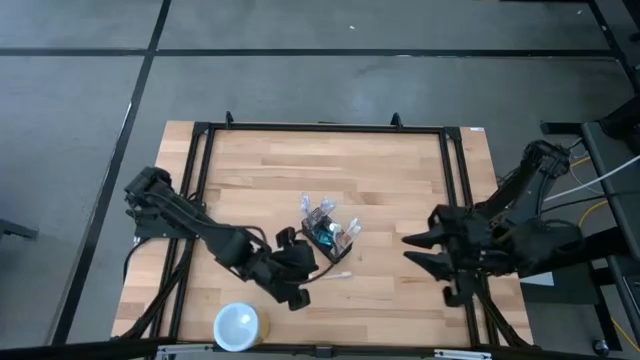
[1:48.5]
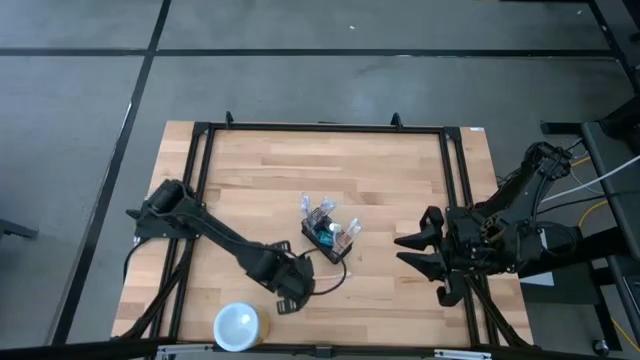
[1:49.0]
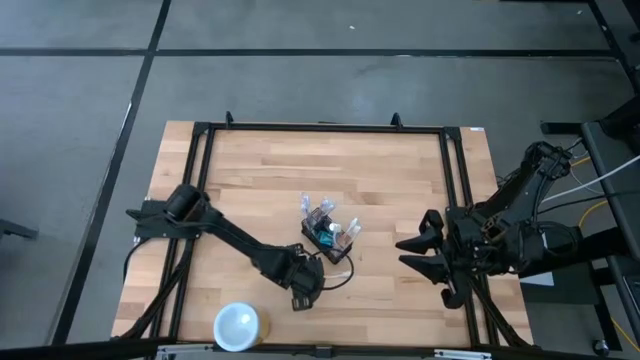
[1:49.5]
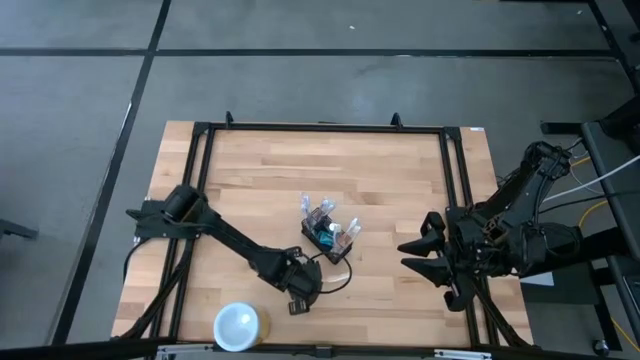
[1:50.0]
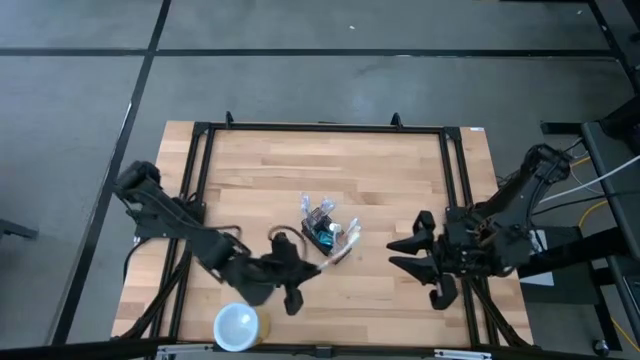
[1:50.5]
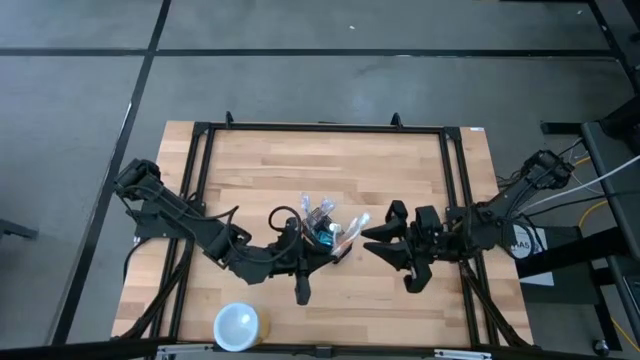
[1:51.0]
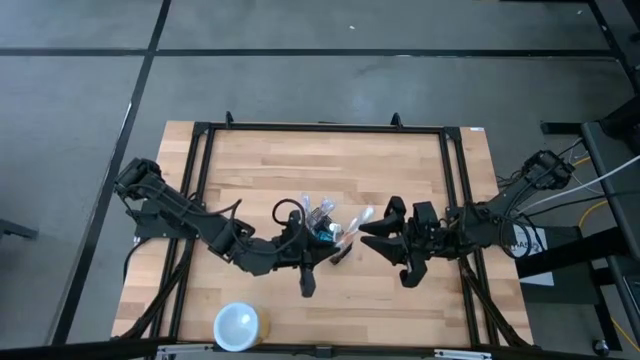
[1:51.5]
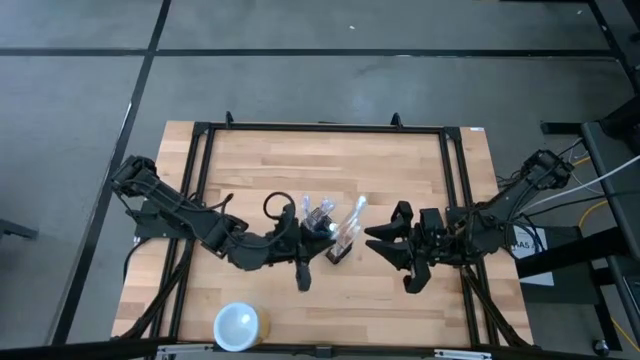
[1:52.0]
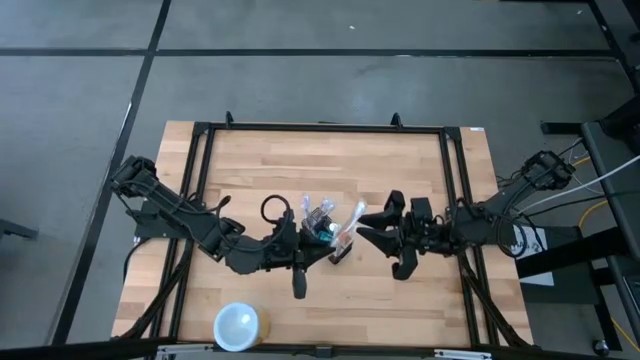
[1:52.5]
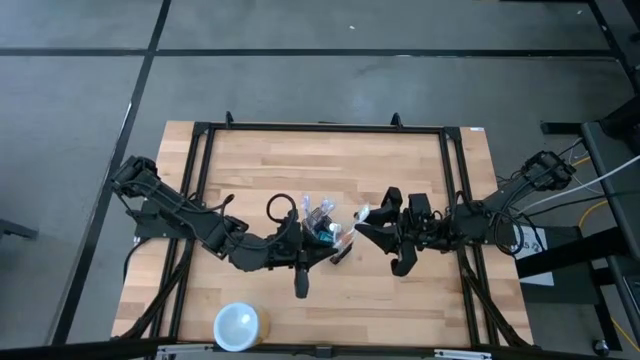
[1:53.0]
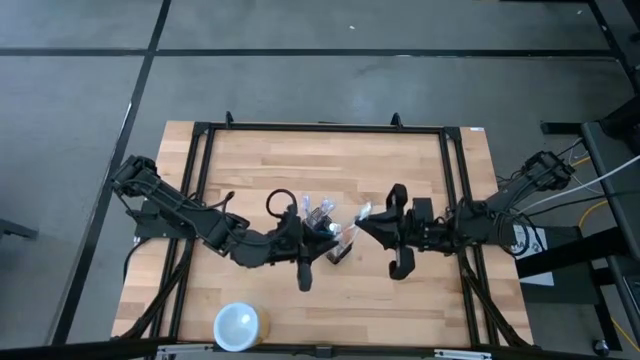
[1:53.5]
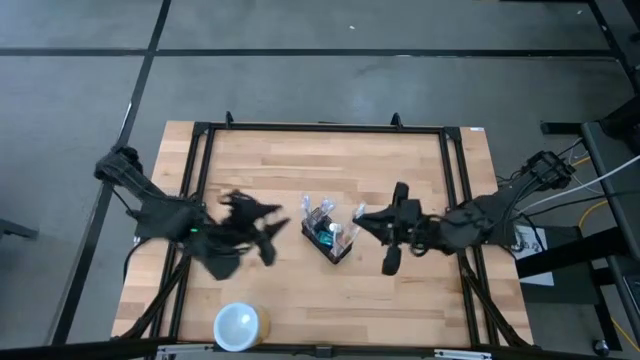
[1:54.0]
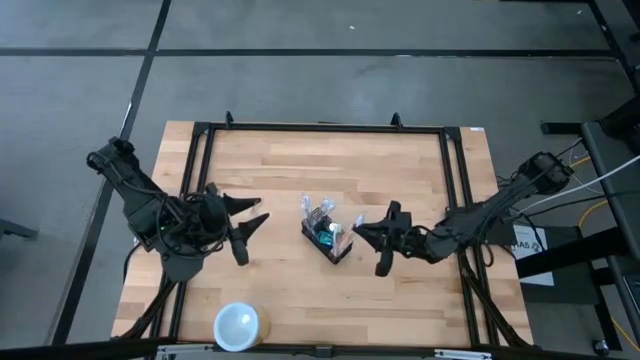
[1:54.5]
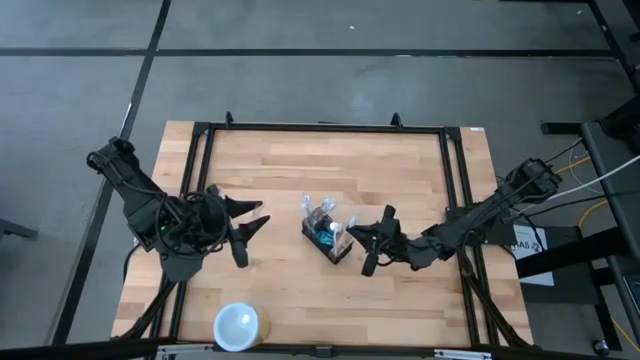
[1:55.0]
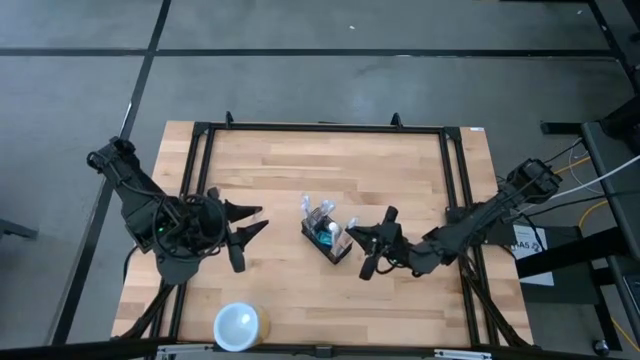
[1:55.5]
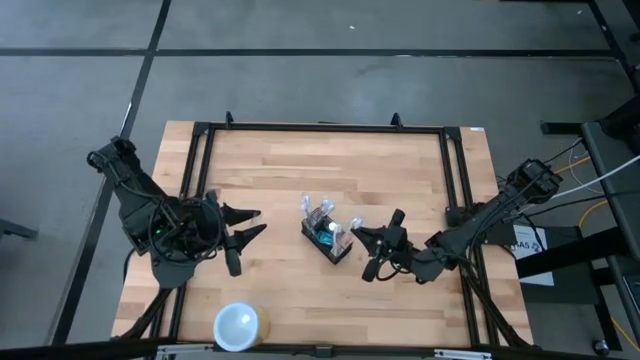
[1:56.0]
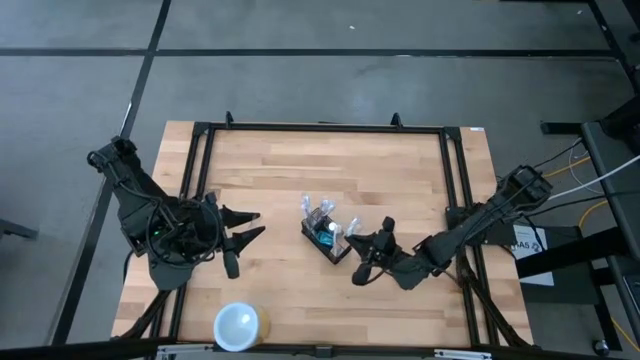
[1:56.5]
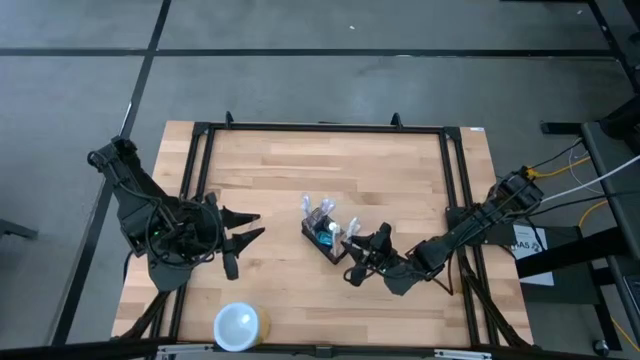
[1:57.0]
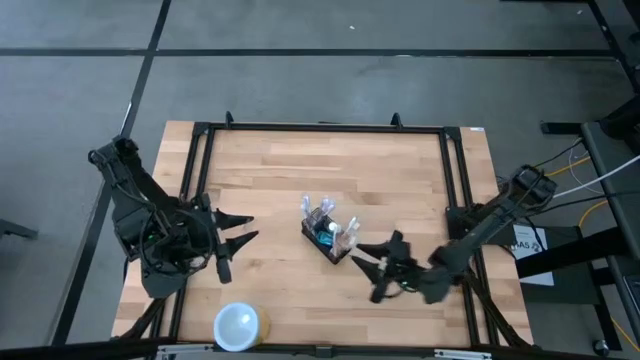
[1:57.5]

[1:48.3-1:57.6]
Task: Pick & Place toothbrushing station
Put the orange toothbrush into the wire organizer

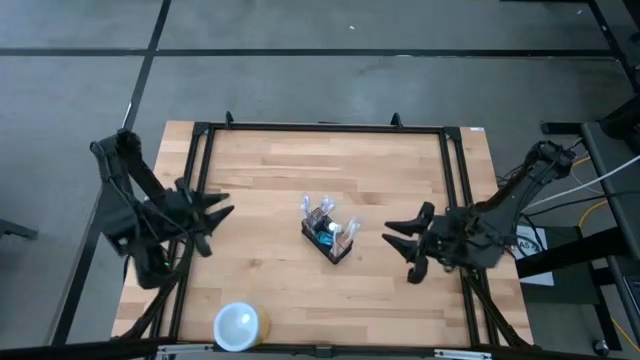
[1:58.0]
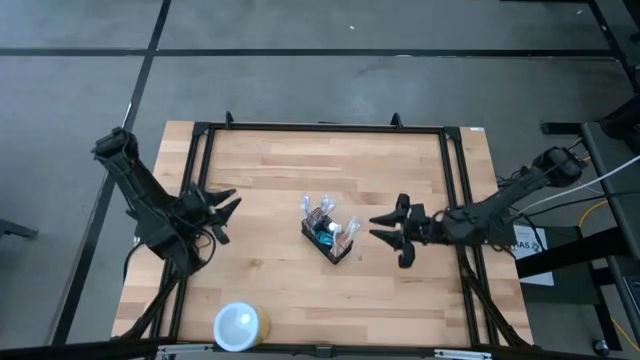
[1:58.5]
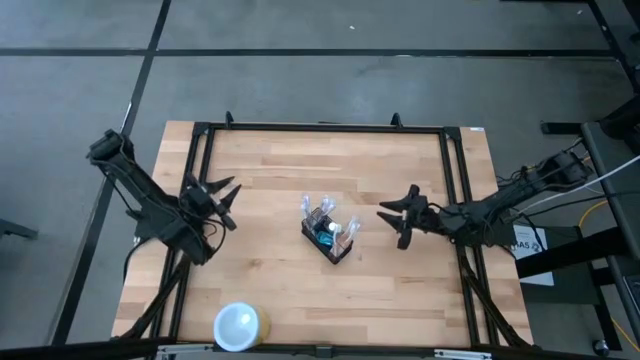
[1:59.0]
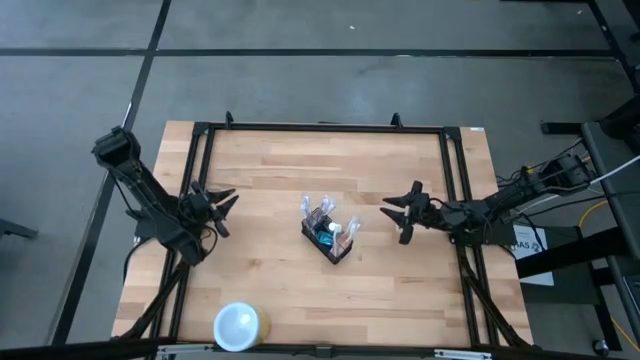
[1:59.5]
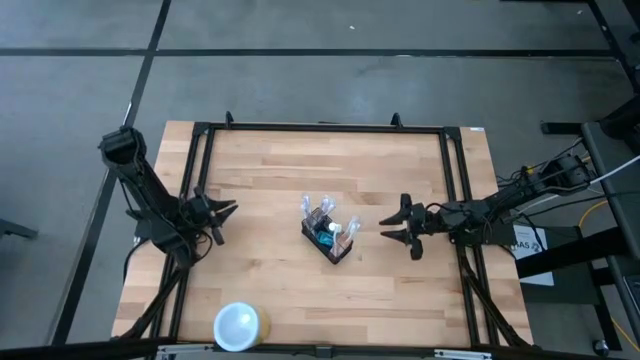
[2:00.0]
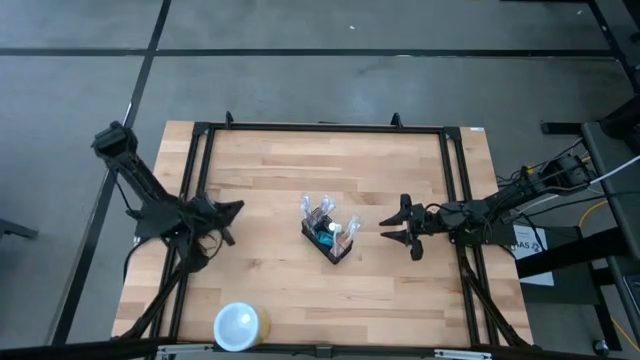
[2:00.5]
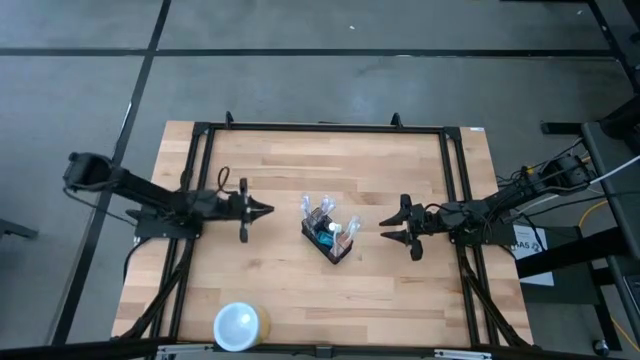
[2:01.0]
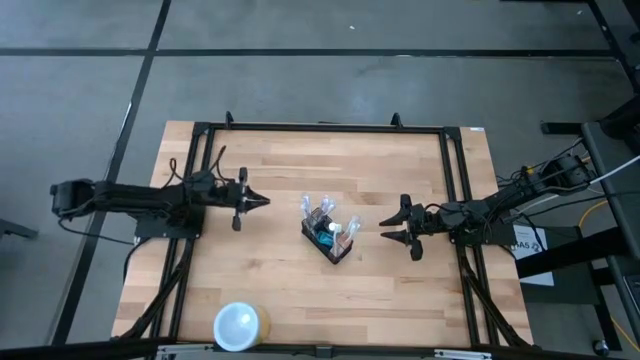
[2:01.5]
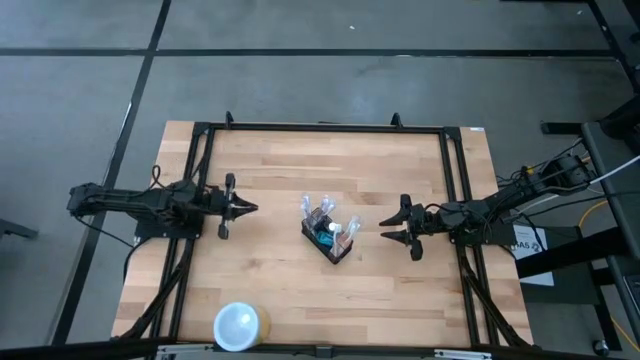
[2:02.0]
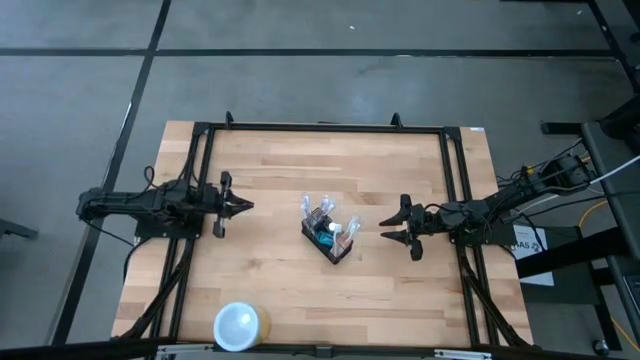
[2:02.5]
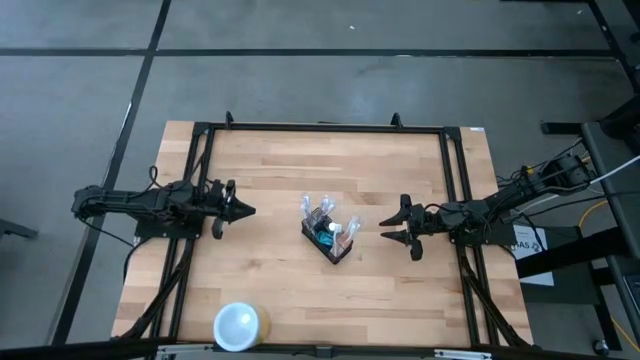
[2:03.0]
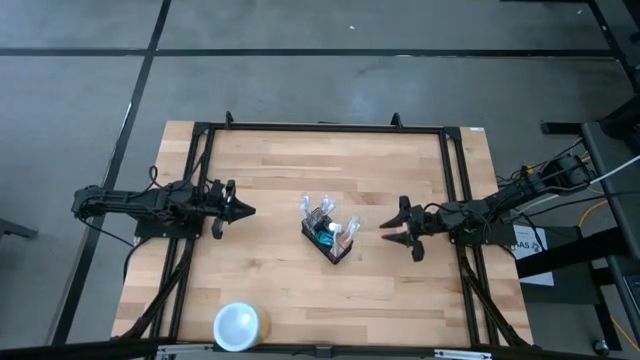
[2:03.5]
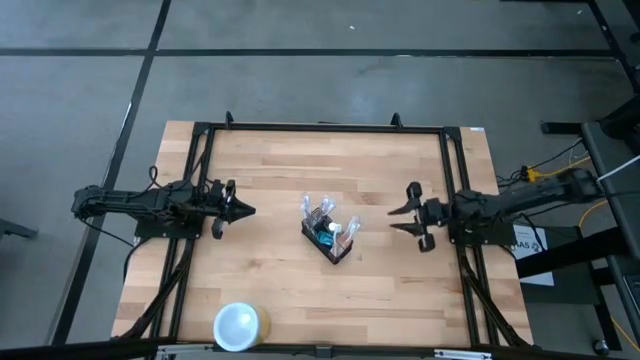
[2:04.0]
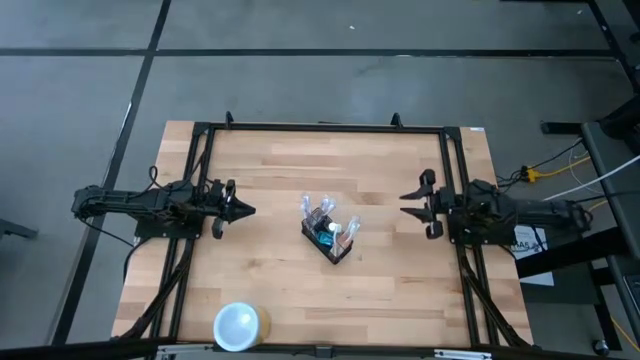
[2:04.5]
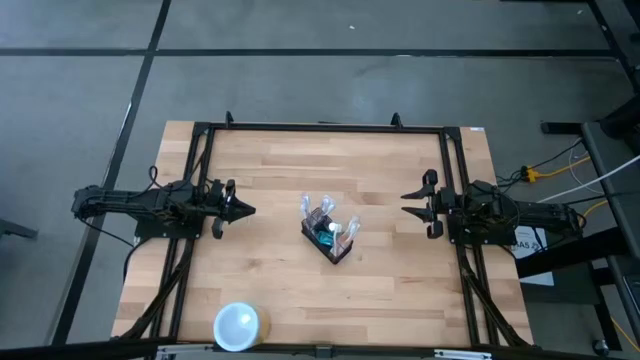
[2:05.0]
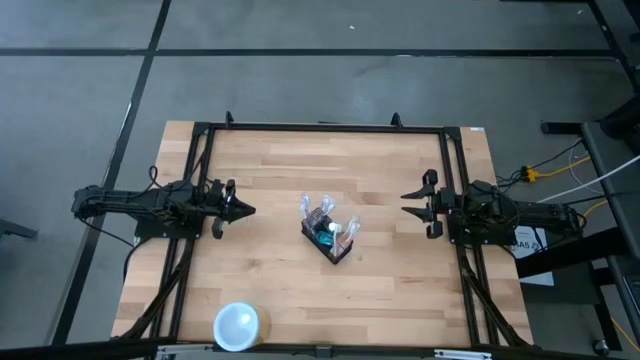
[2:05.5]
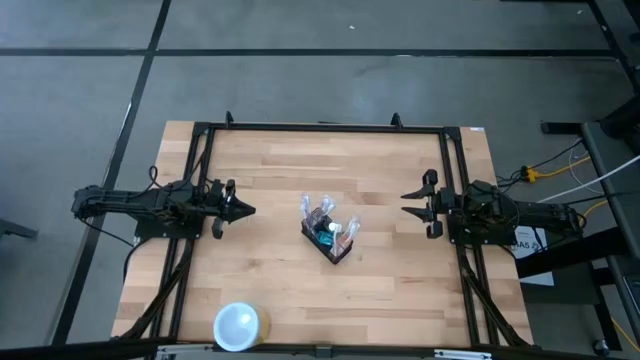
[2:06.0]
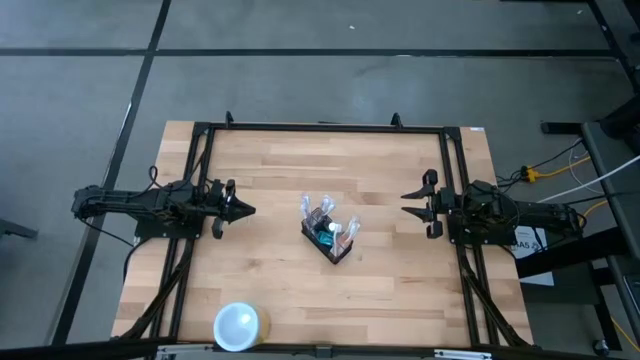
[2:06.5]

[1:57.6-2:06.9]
Return to home position

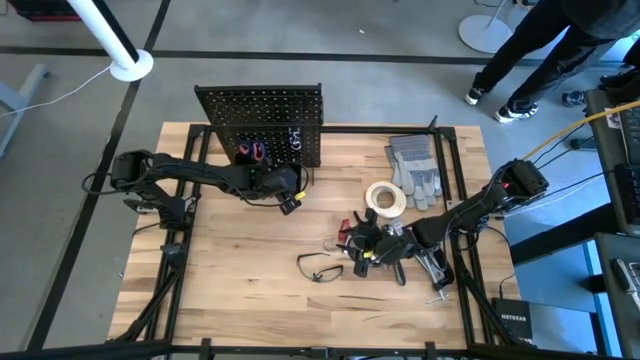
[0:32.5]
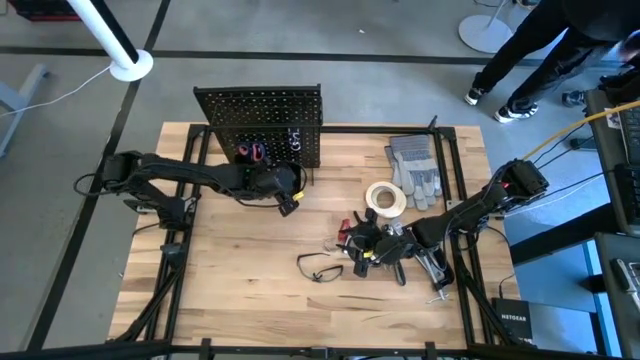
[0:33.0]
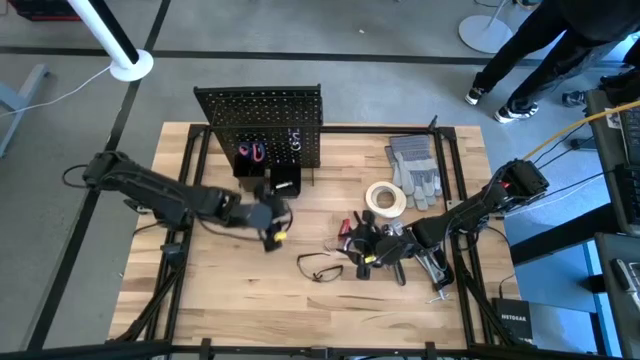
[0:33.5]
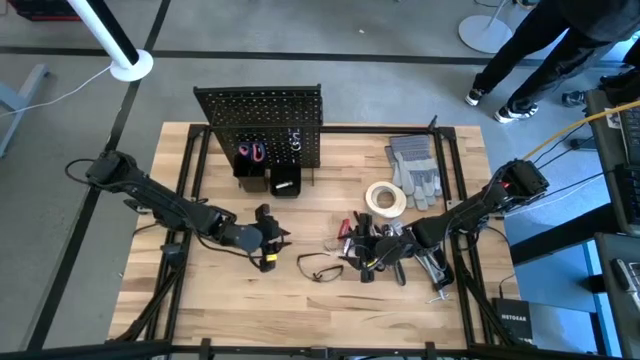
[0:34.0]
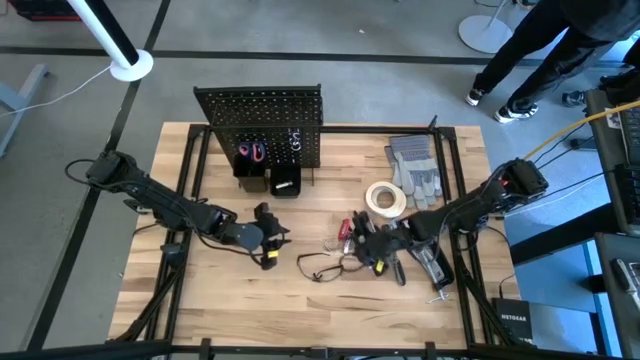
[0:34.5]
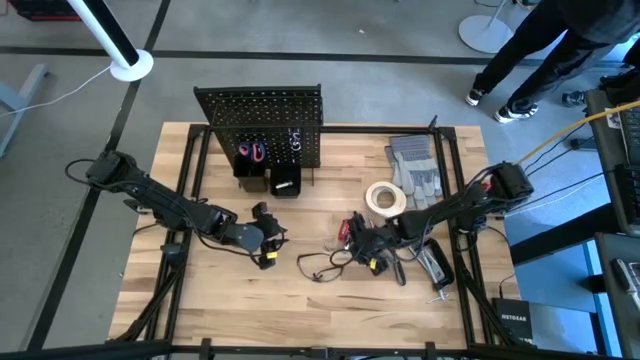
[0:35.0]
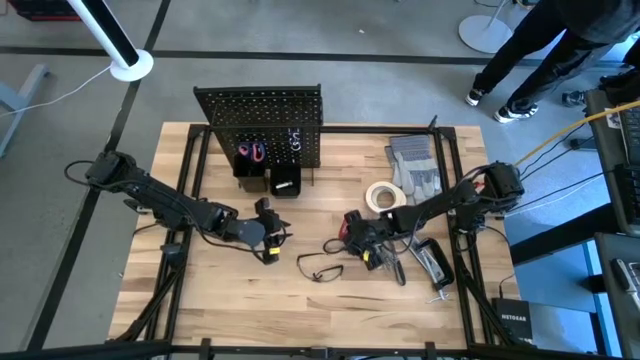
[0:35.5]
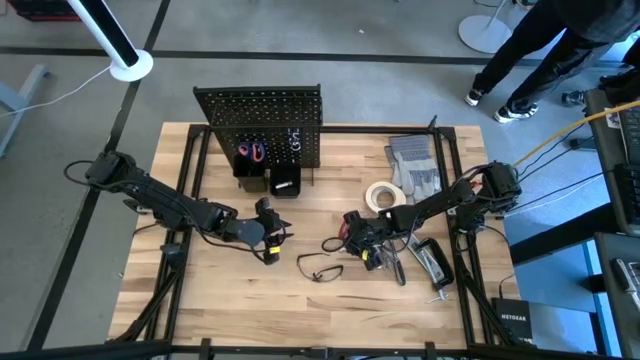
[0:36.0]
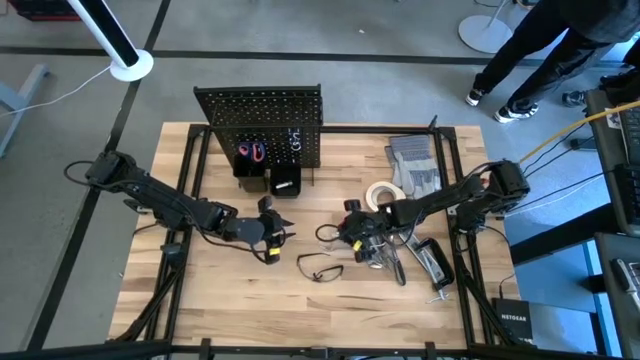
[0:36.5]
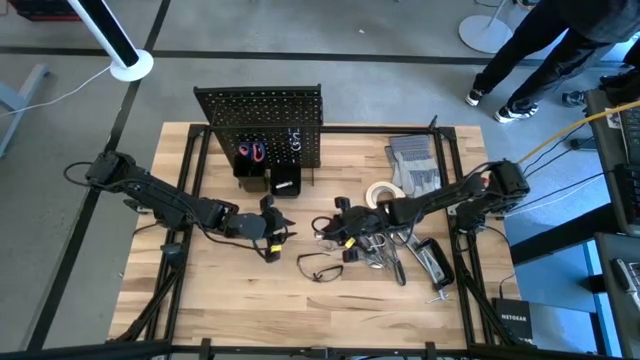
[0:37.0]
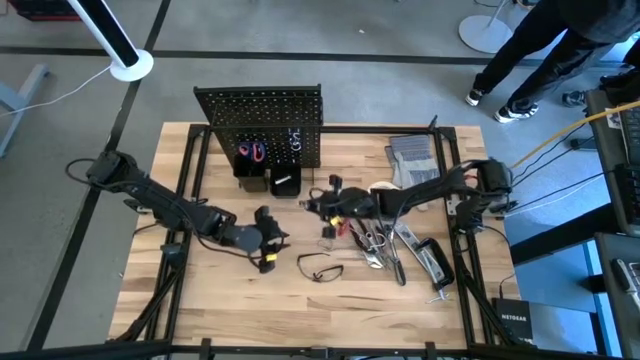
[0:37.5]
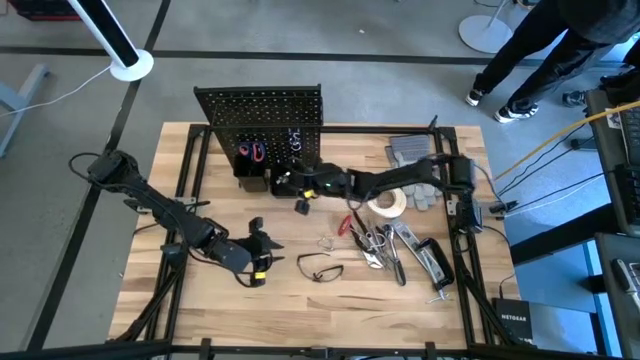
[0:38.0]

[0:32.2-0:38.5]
Task: Hang tools onto peg board
Put the socket wrench into the right pegboard organizer bin
